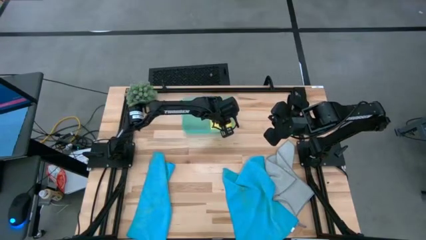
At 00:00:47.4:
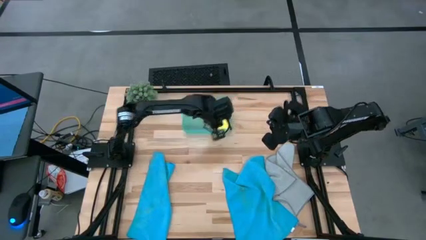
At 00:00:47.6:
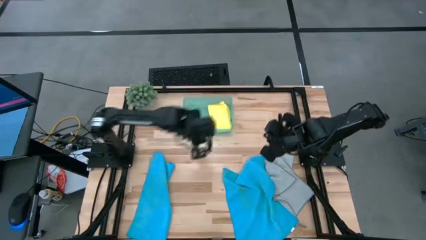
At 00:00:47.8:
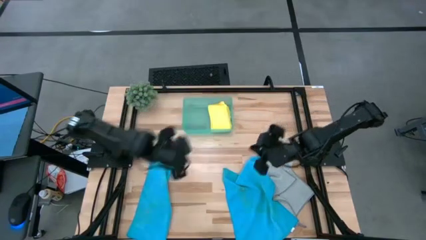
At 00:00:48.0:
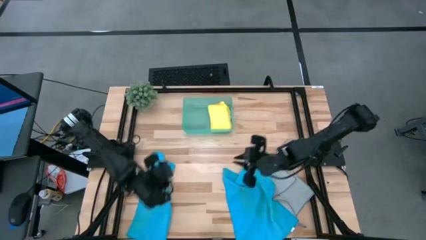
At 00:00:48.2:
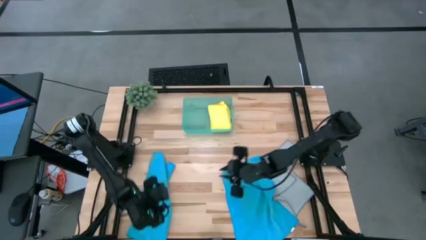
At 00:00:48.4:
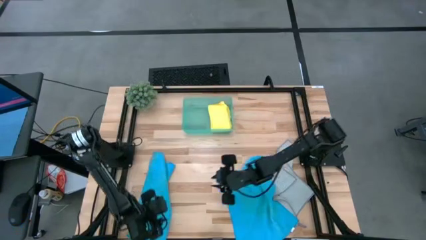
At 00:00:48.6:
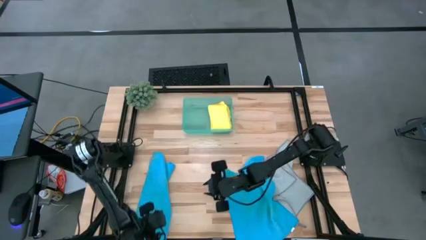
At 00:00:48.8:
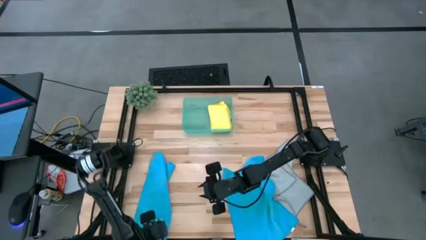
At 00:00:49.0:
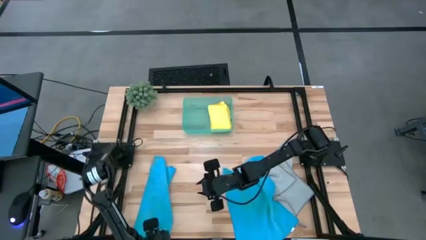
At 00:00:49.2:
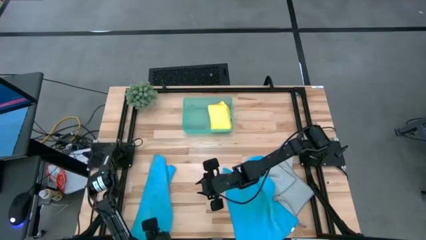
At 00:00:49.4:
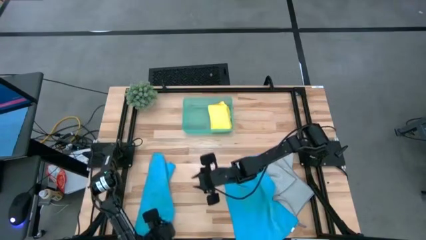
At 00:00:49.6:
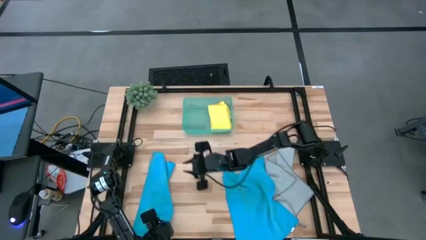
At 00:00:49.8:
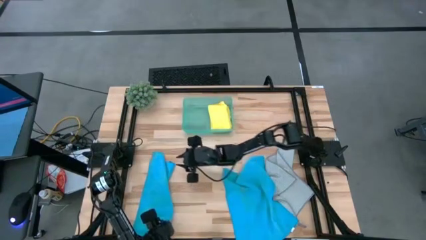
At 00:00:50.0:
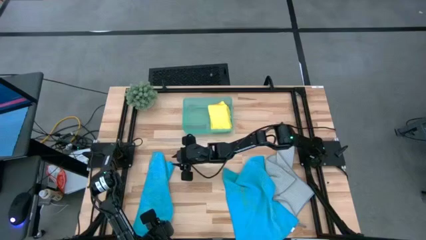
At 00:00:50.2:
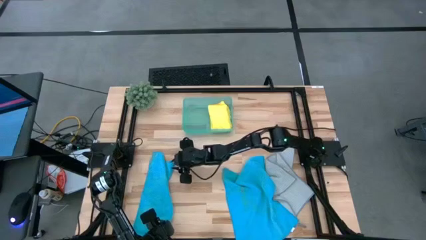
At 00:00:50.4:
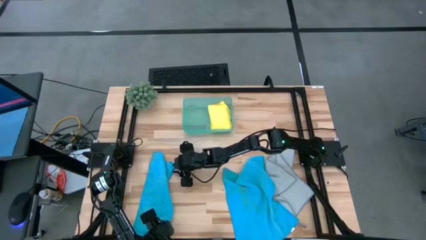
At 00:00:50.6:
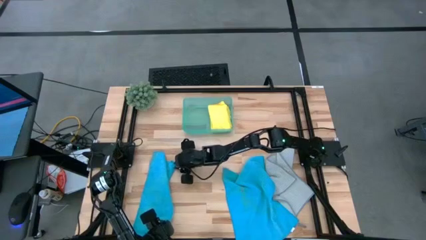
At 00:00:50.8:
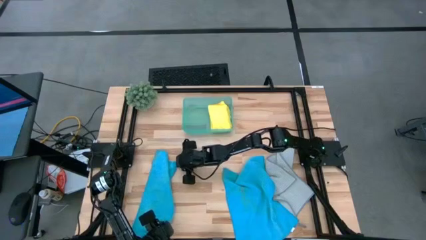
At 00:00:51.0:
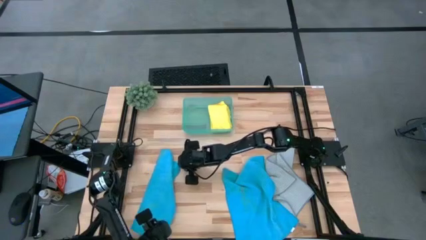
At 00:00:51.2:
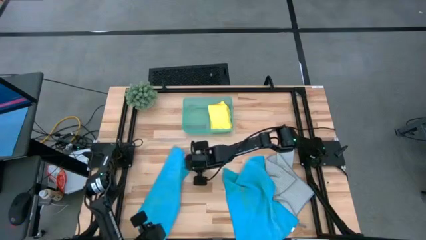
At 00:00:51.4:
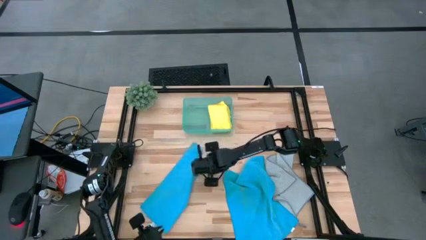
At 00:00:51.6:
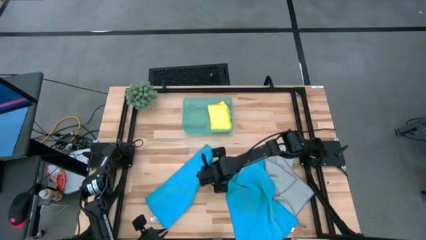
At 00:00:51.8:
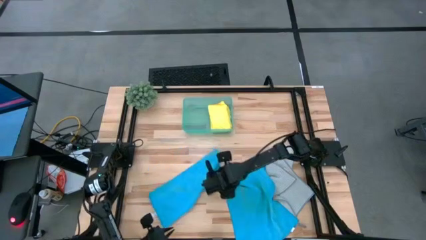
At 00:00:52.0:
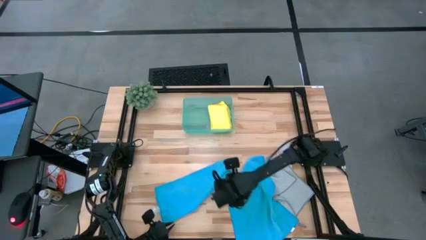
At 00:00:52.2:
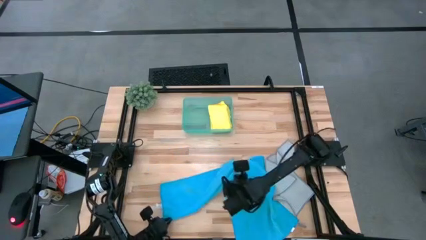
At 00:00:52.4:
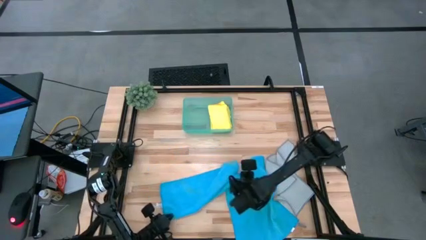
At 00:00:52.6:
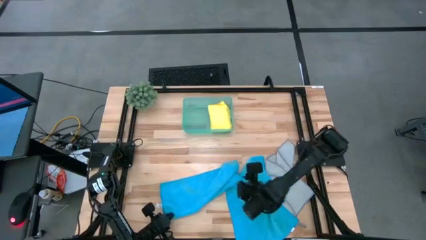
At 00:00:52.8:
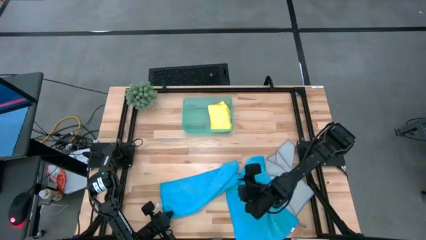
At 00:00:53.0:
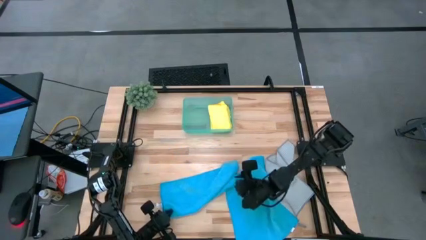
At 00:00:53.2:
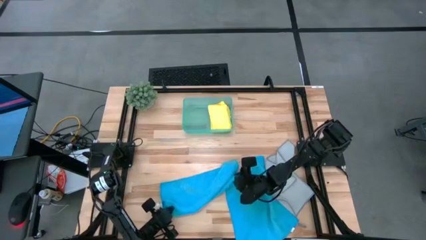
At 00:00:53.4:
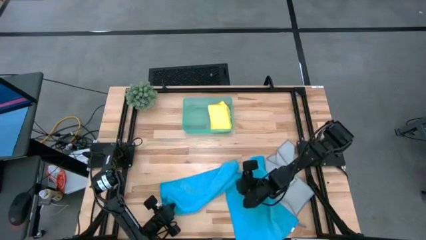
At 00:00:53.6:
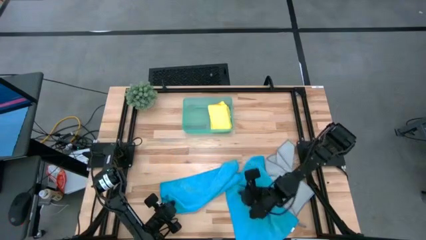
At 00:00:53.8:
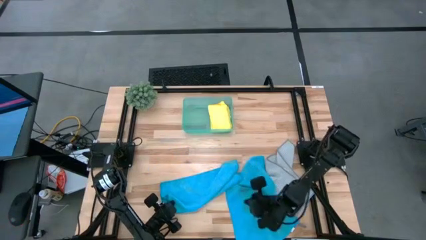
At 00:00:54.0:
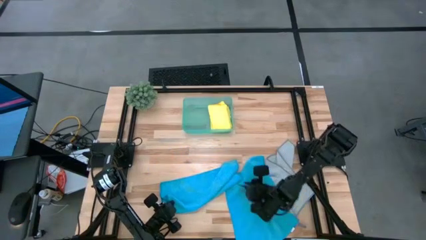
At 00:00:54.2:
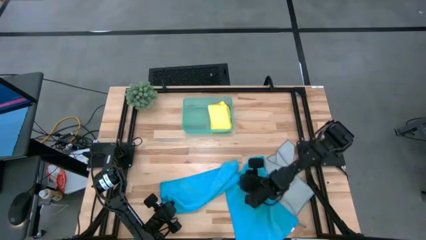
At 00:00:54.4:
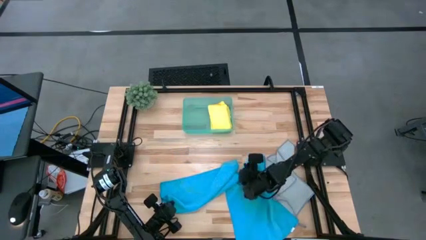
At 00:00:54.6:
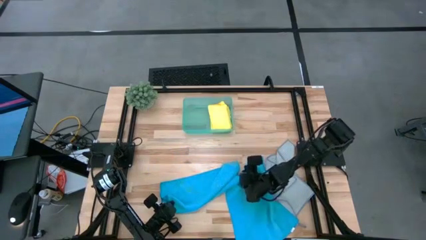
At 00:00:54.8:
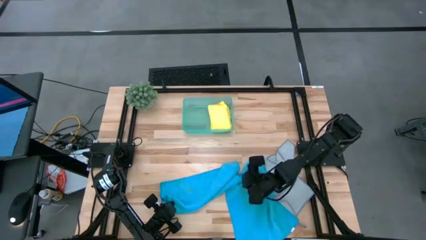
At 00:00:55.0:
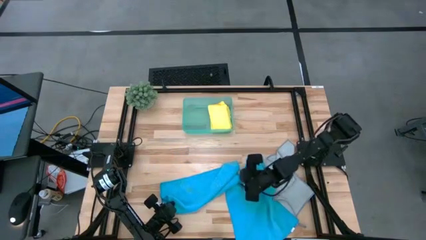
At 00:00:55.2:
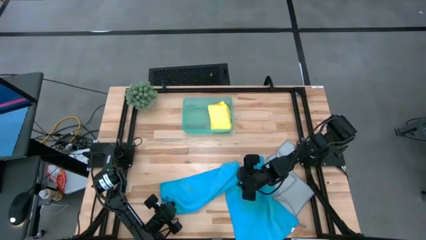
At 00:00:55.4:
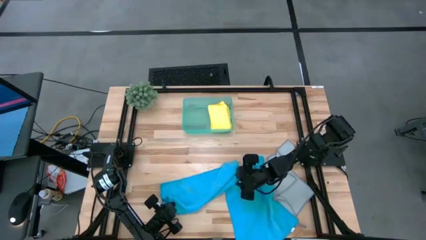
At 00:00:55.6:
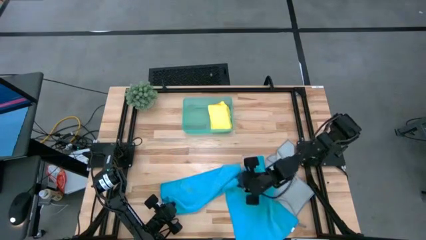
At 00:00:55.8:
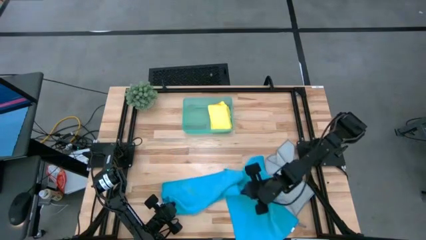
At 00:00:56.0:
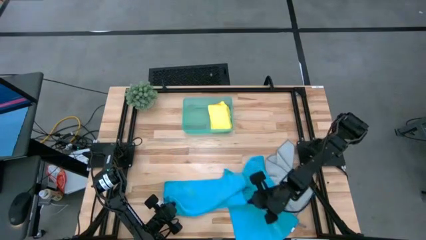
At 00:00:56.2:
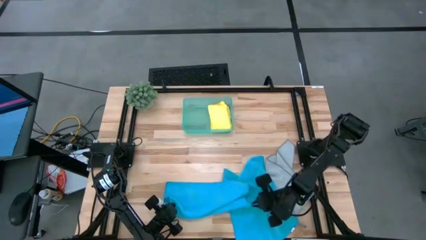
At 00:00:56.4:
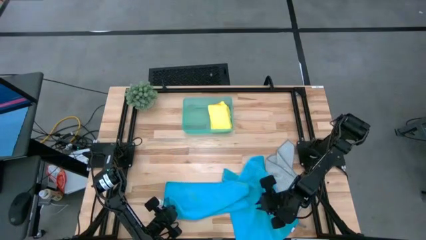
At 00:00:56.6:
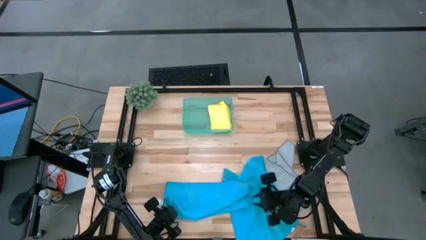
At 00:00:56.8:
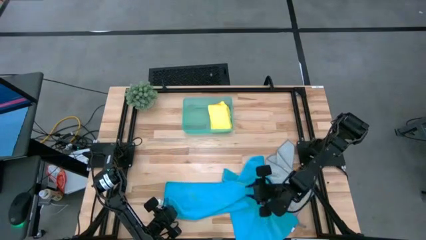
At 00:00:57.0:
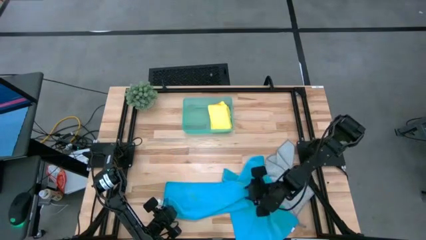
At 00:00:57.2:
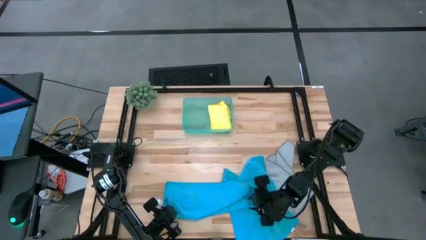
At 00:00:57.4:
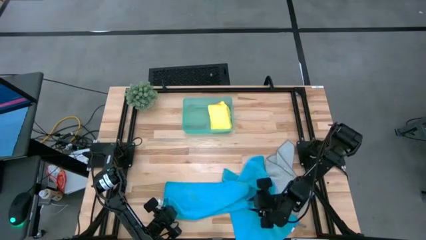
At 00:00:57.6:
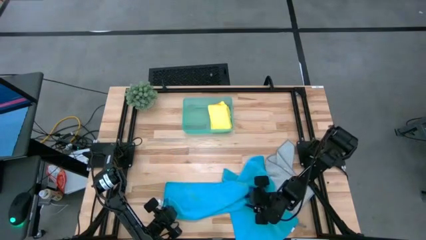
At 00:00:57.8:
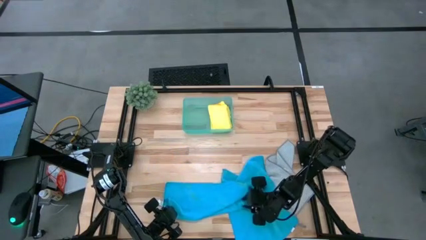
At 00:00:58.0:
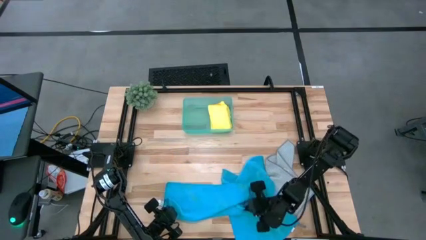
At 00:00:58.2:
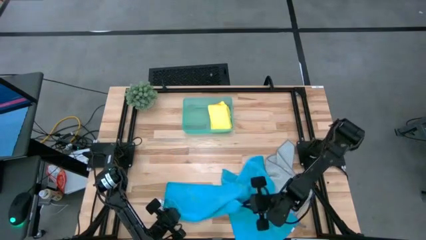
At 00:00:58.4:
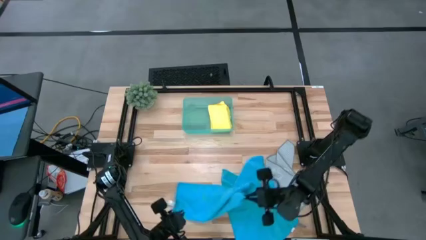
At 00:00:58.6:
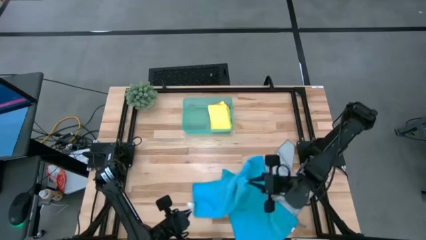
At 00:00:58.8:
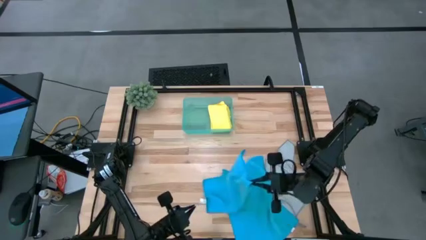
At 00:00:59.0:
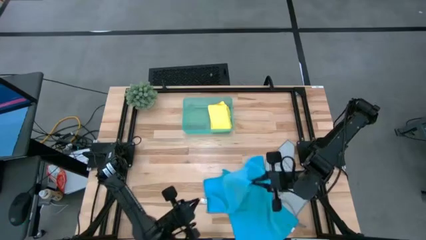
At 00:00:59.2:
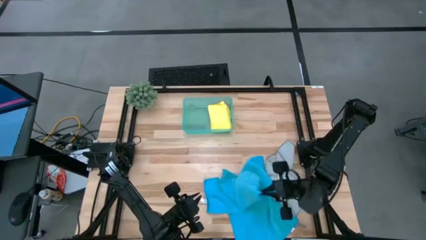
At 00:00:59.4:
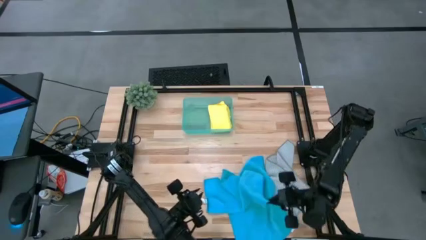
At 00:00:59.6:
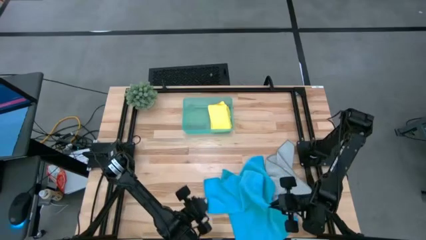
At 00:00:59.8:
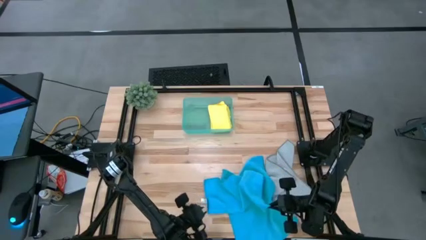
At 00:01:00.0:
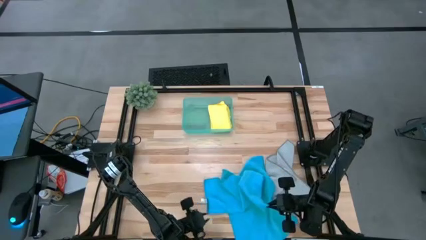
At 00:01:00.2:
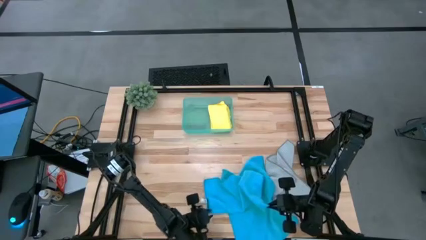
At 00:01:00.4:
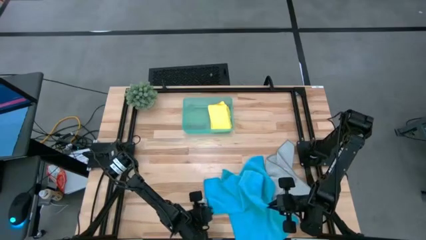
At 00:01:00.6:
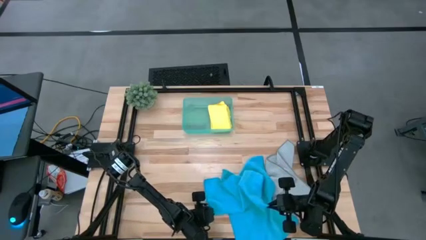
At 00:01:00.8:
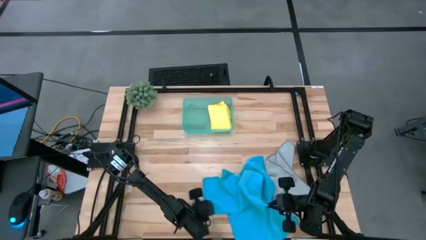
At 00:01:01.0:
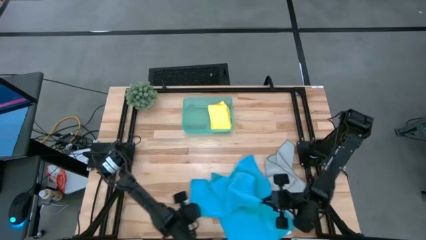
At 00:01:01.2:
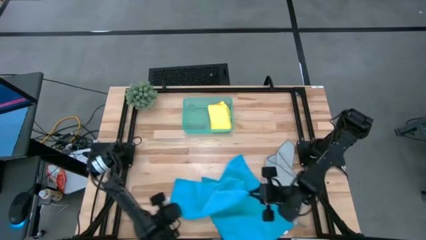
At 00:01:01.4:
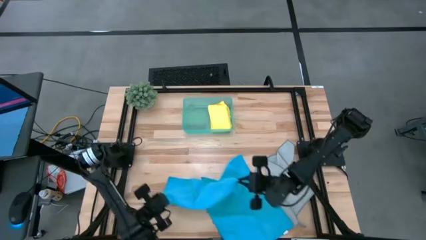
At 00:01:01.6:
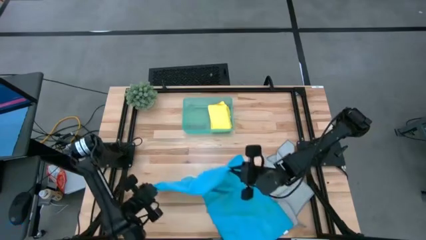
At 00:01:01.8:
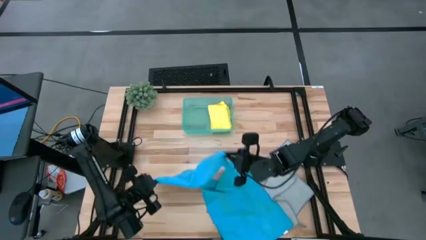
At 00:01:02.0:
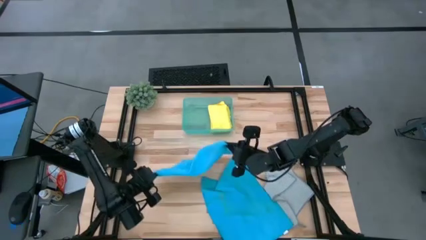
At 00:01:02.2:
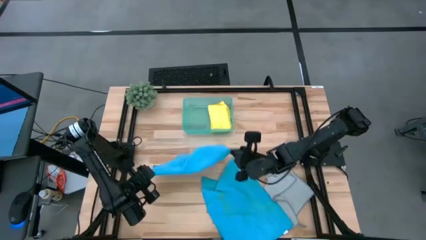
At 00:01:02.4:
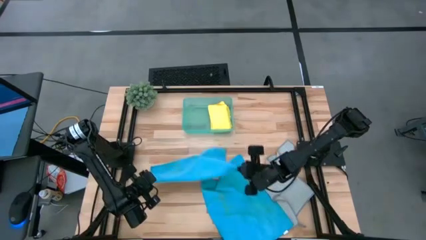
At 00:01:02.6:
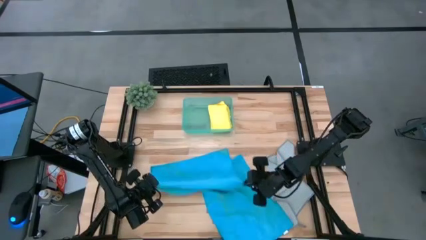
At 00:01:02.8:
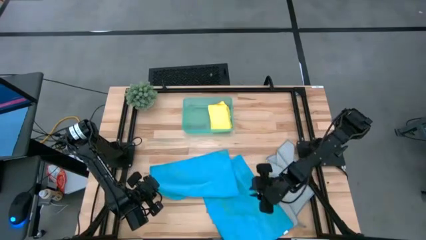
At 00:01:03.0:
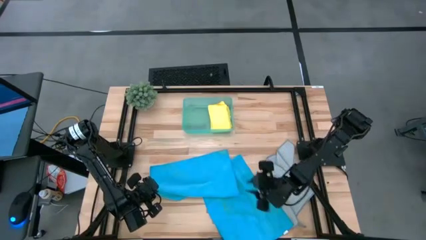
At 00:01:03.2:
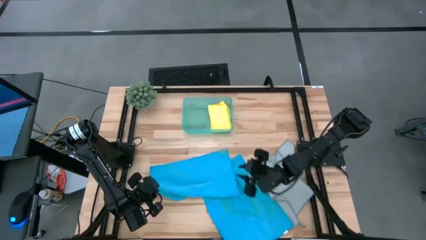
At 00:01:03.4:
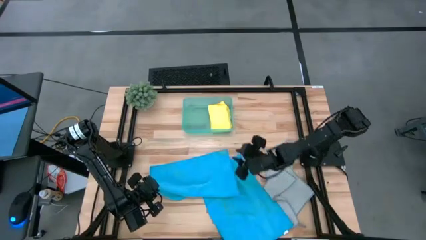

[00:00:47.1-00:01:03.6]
Task: Fold microfiber towels
Fold the left blue microfiber towel

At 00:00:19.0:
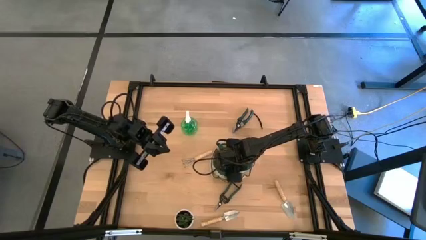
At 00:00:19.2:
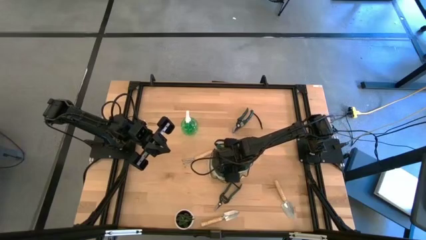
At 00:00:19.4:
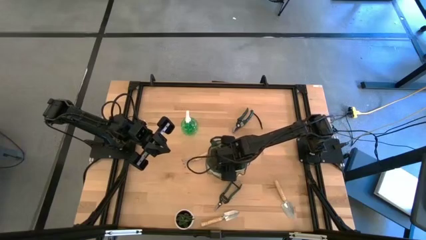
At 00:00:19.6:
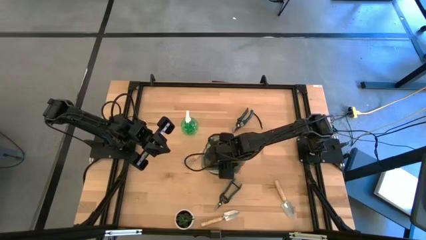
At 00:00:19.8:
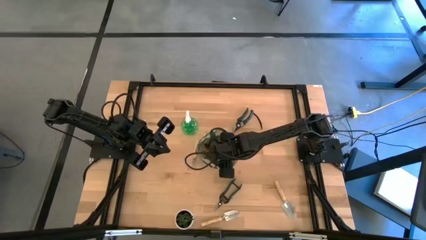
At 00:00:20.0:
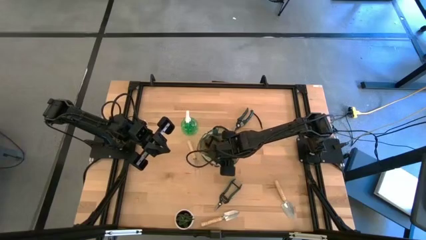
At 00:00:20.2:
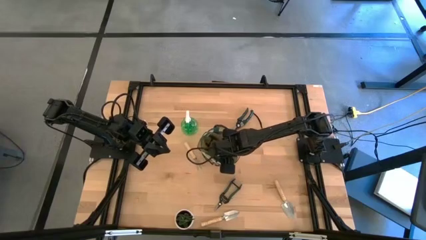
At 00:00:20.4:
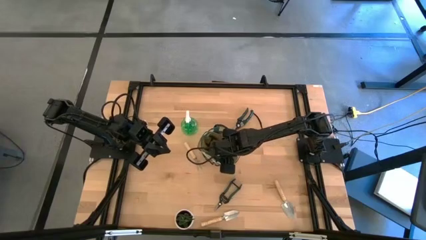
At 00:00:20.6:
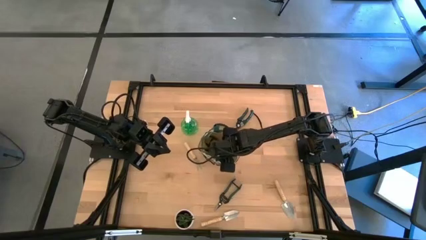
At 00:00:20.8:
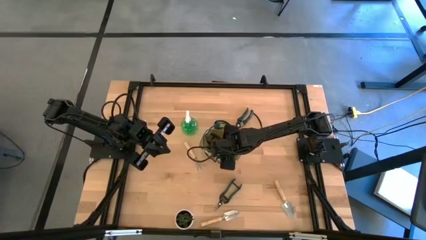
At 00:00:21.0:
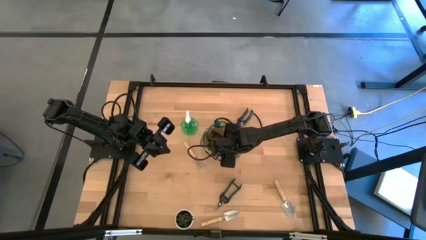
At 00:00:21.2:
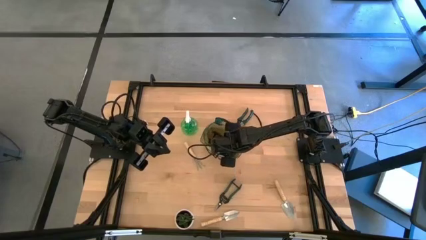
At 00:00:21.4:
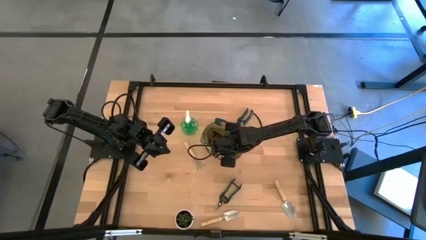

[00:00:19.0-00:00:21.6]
Task: Pick & Place Garden tools in Gardening bag
Adjust the green gardening bag
